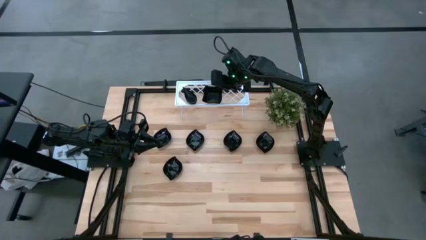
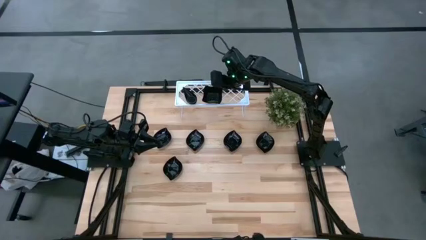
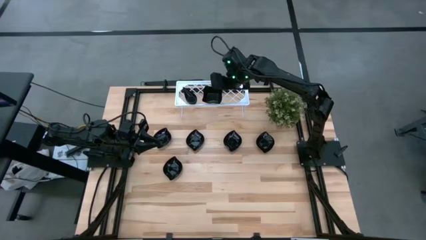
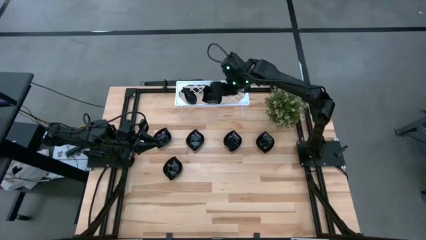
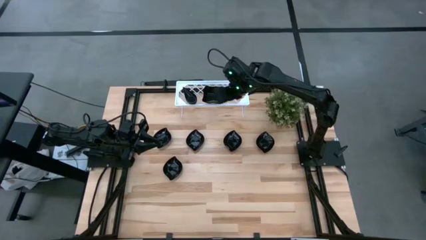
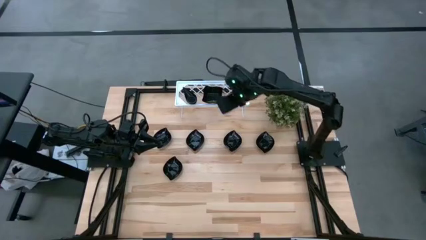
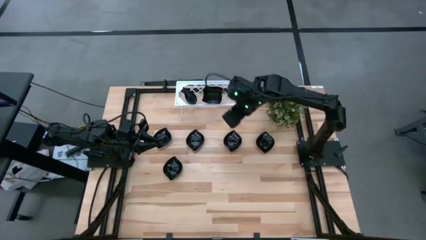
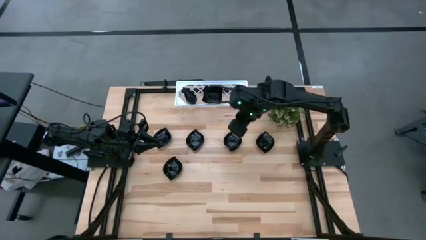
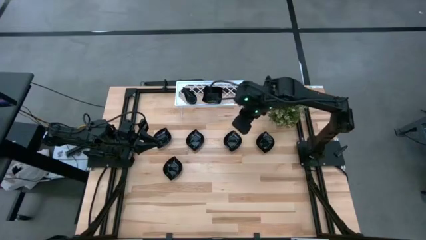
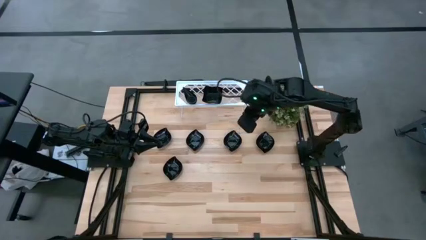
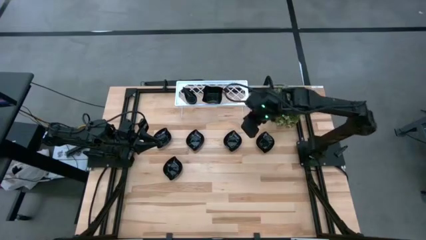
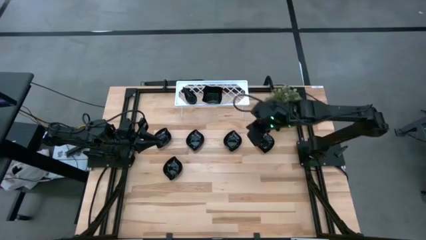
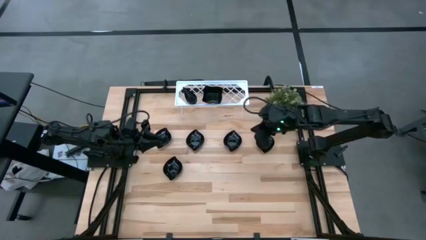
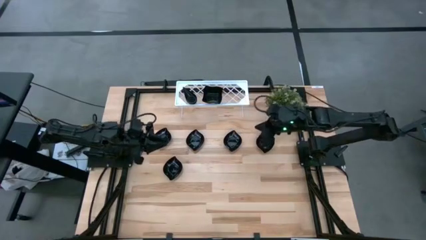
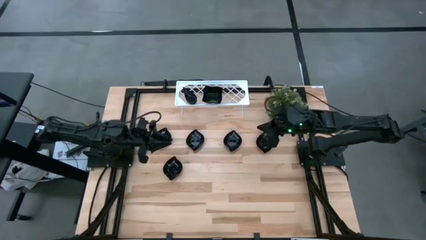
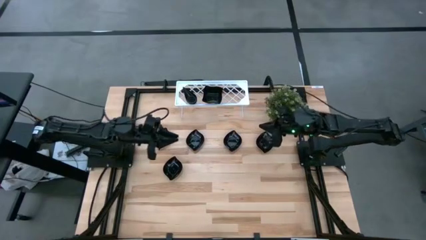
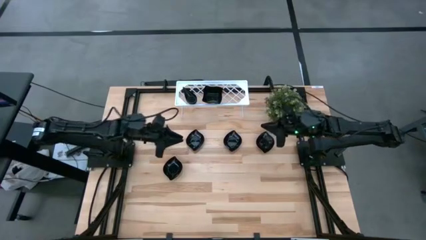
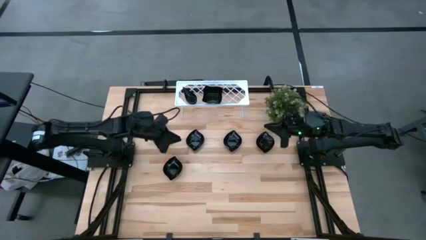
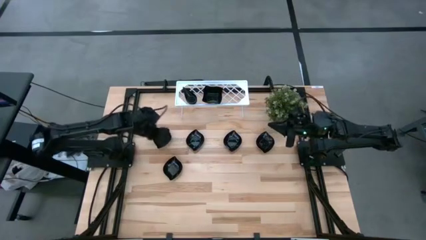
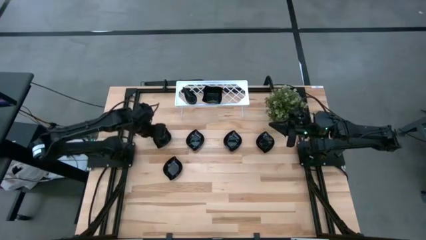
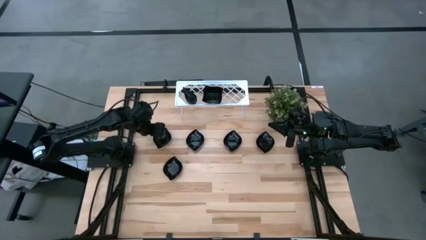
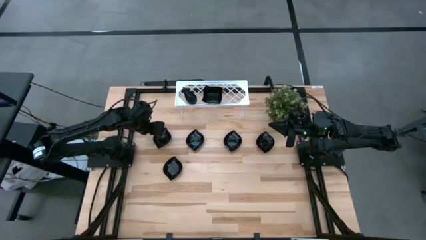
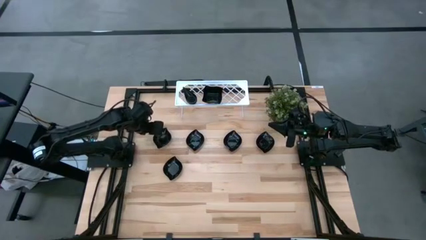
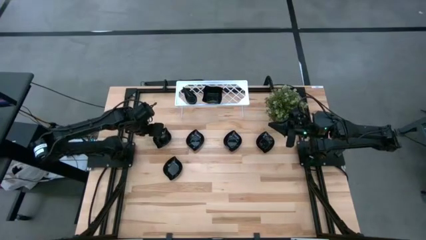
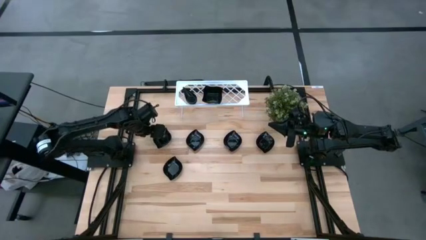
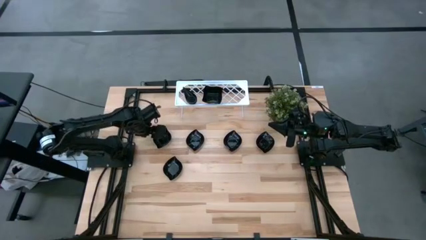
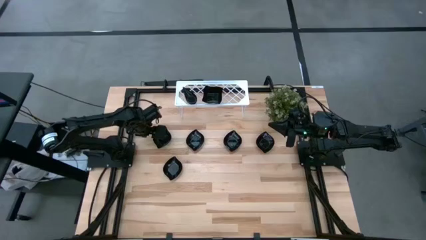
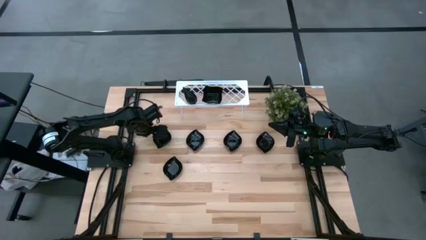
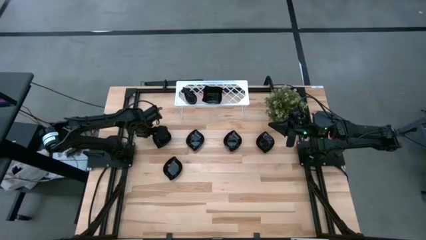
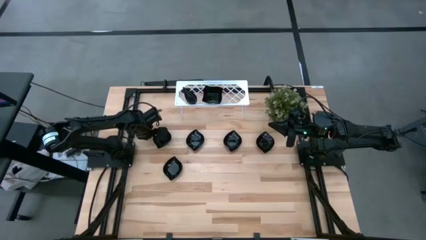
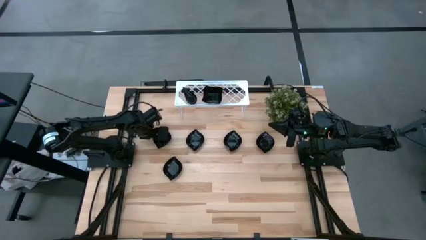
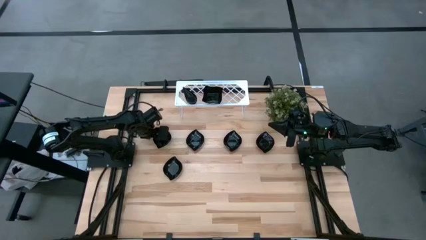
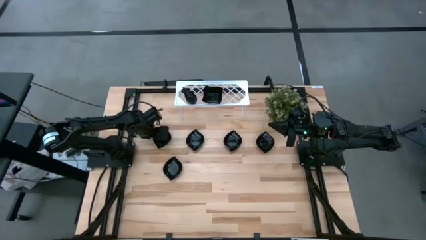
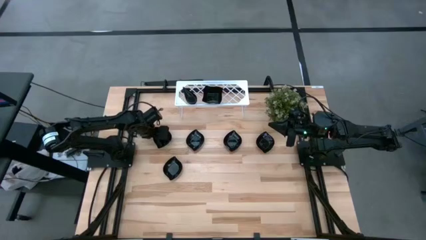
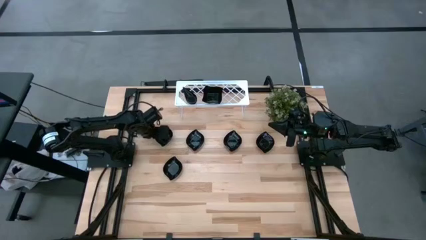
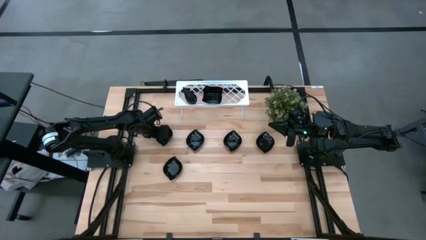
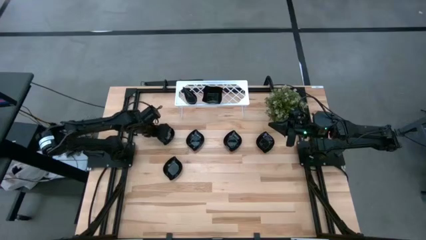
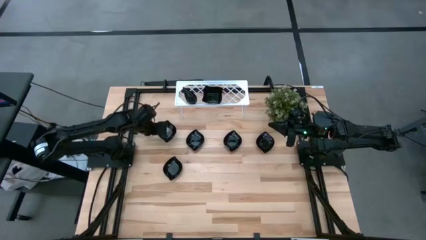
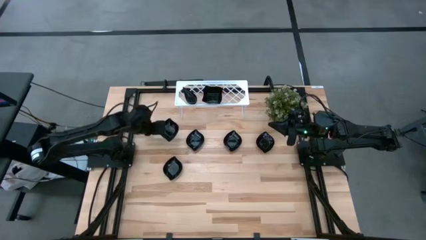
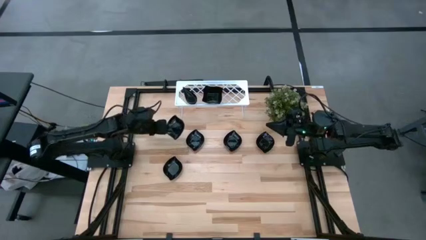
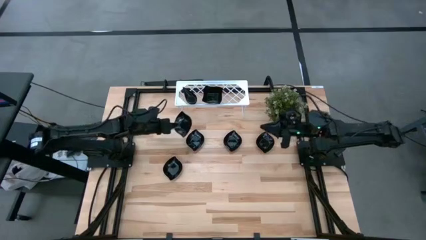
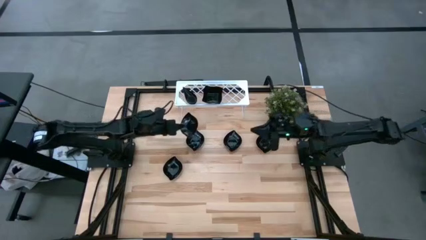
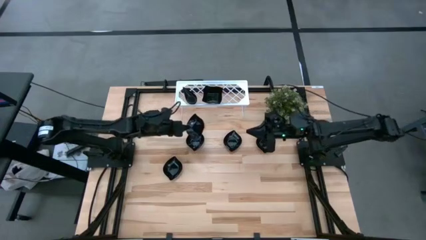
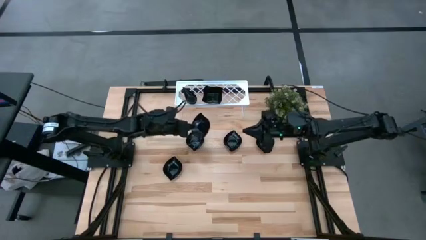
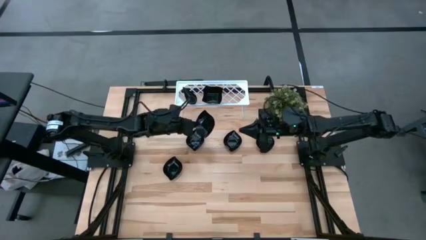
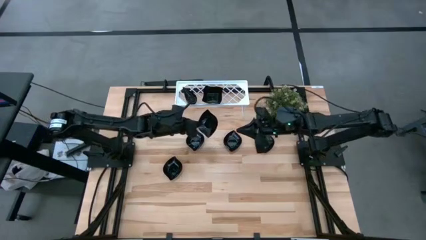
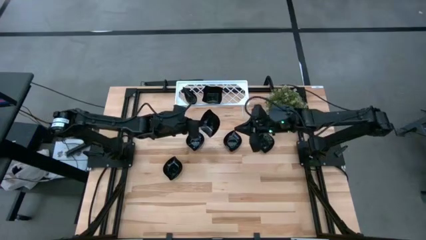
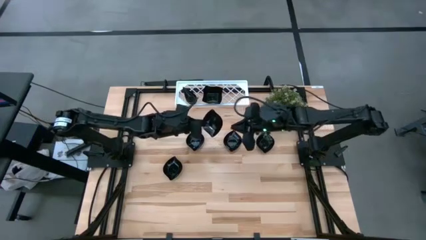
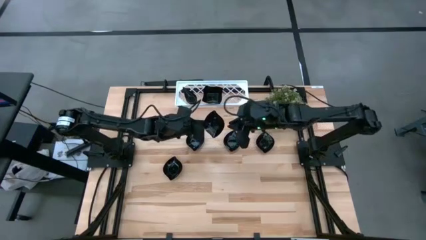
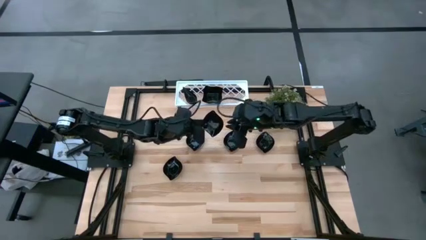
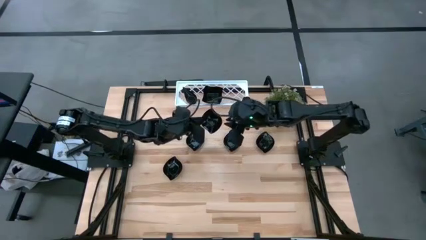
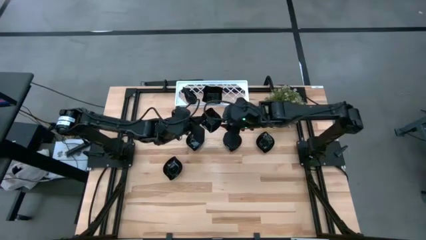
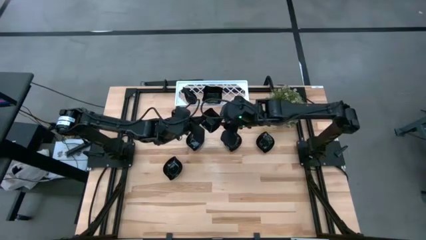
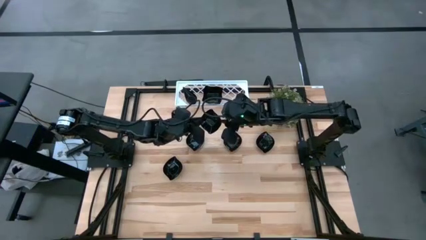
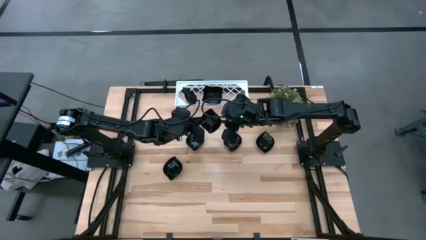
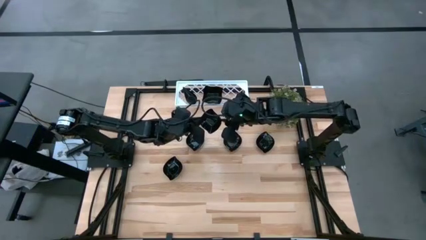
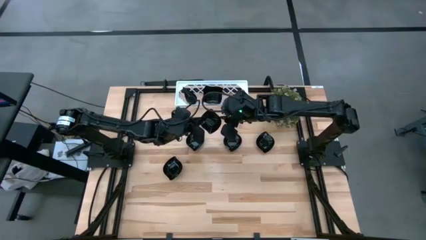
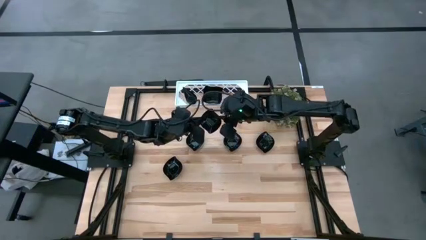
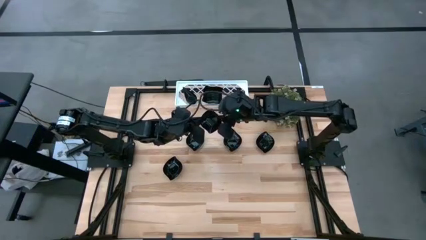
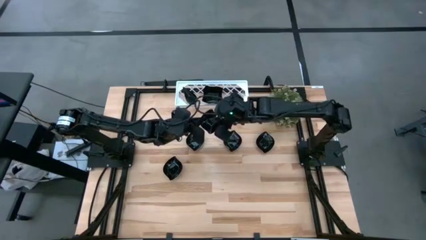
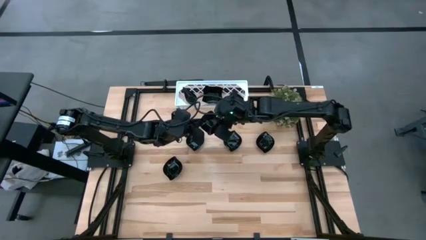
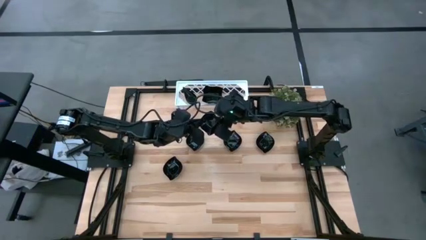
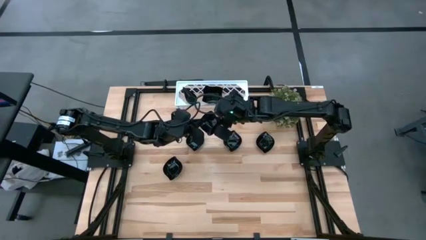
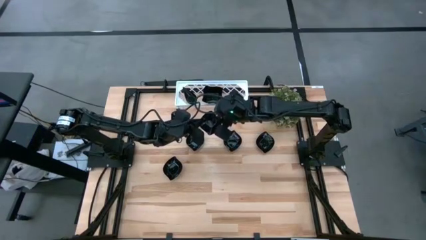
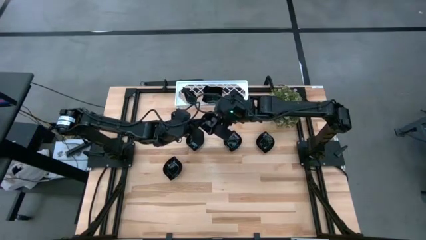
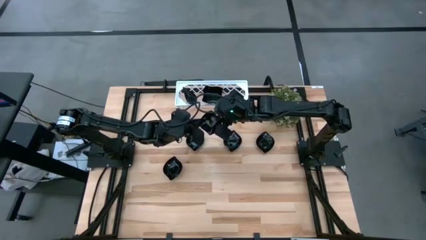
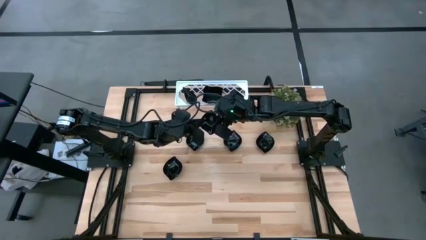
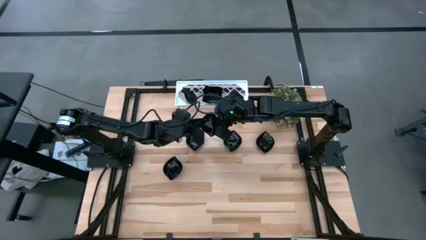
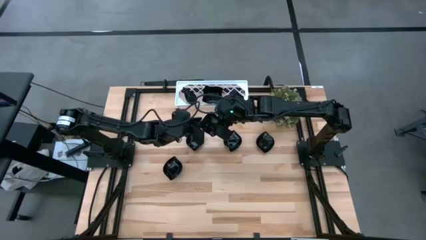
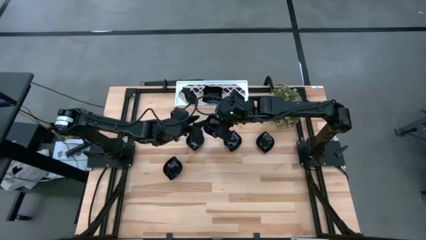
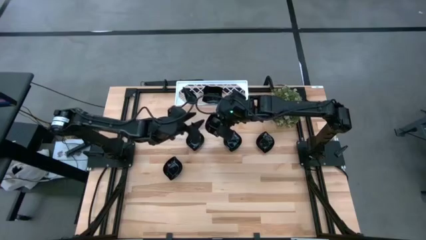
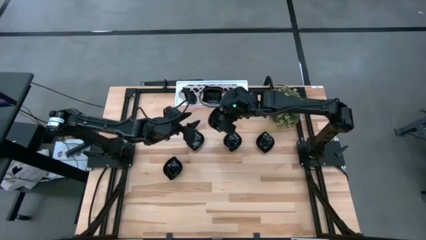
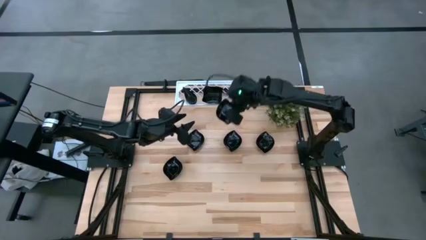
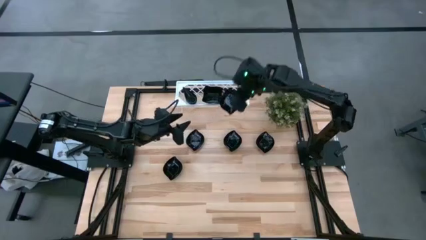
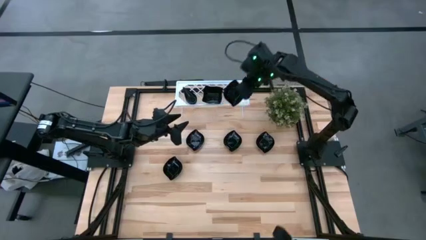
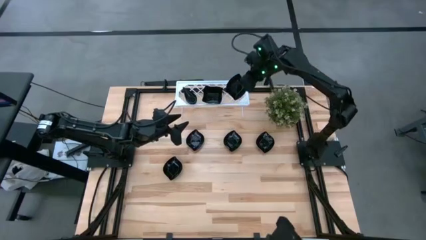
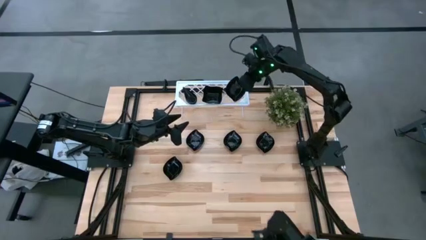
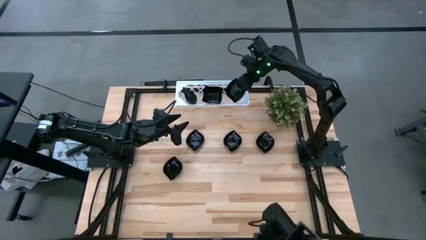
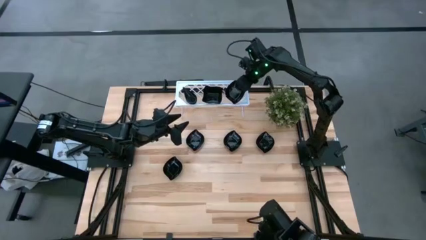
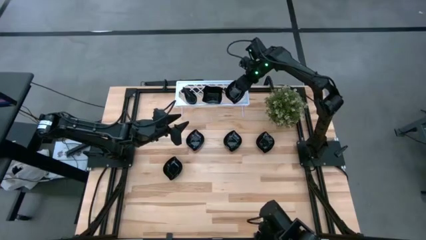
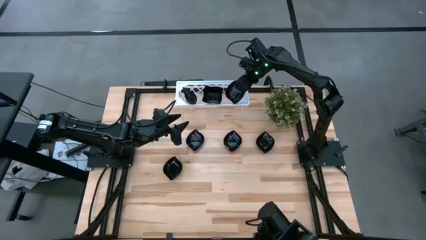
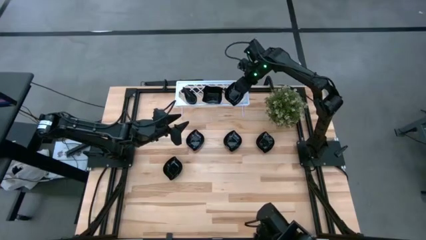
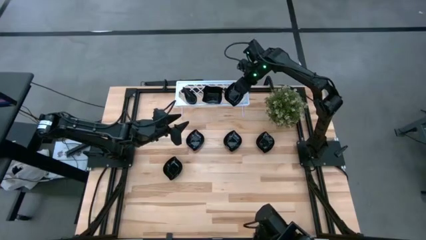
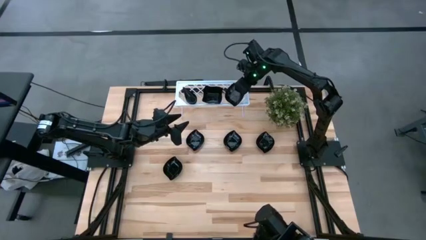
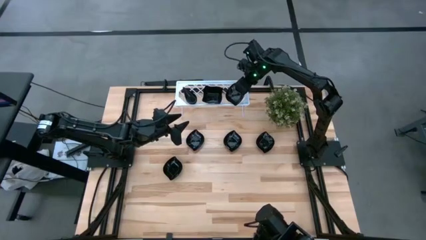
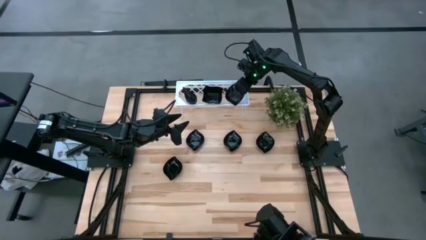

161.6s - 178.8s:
Task: Pick & Place Mini shaped plates
Put the leaf shaped plate on the shelf
